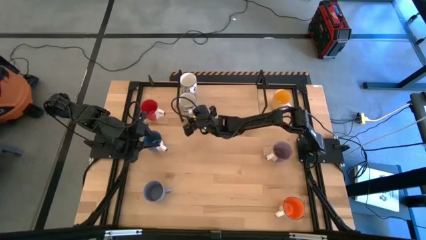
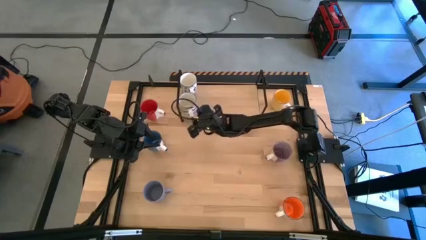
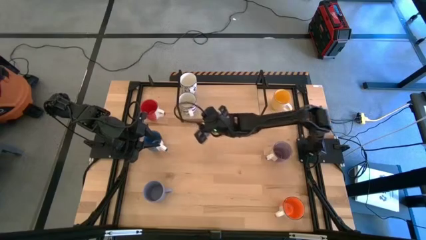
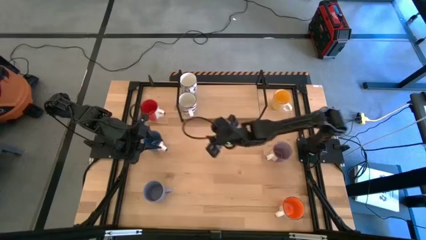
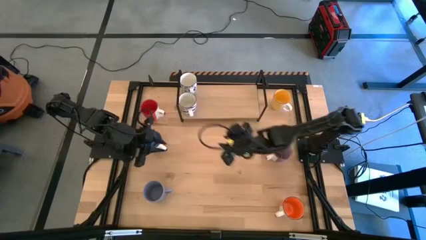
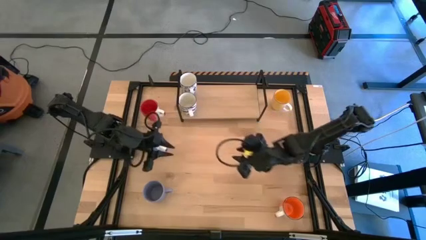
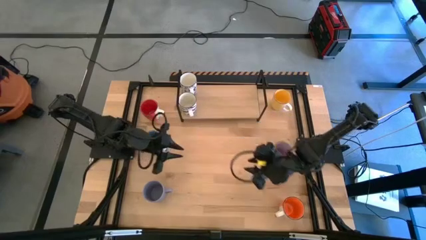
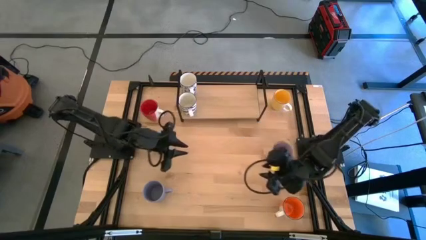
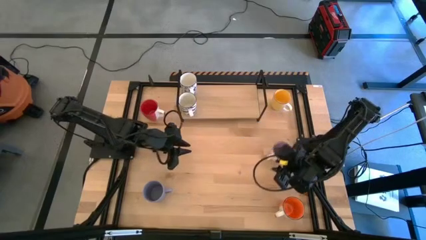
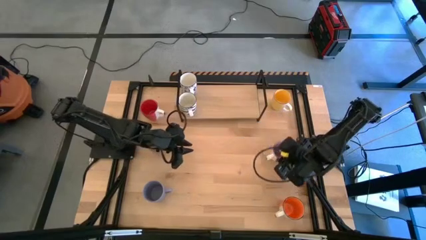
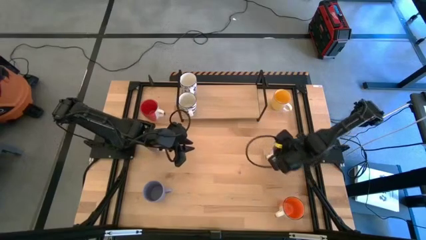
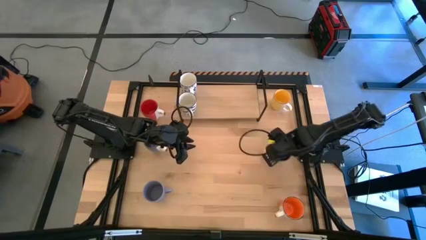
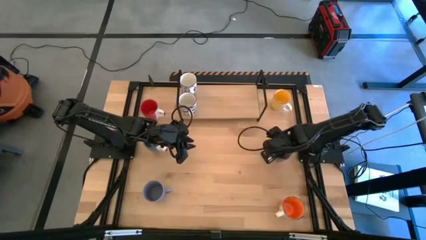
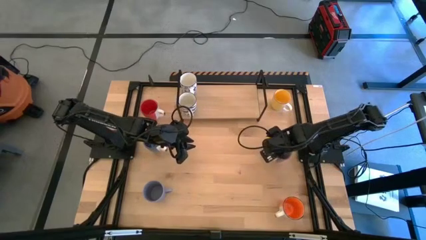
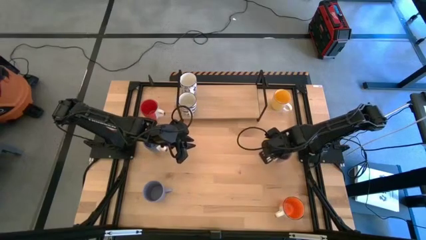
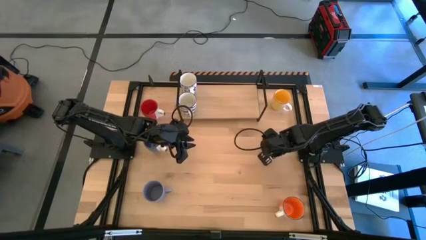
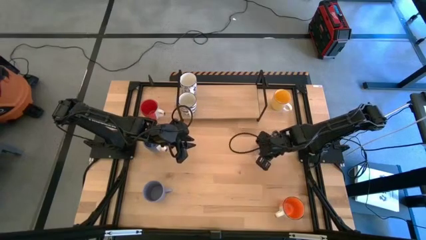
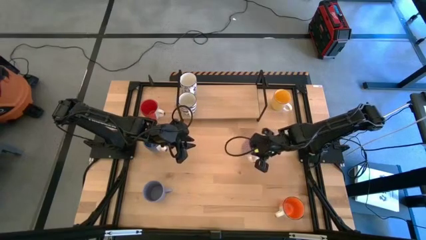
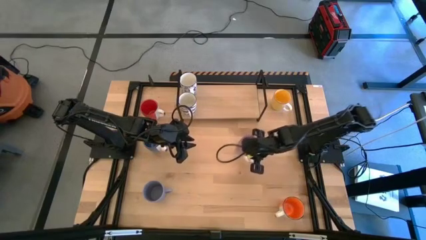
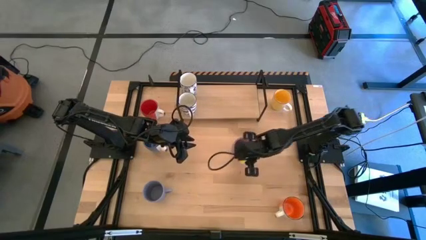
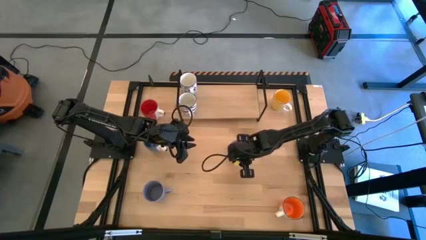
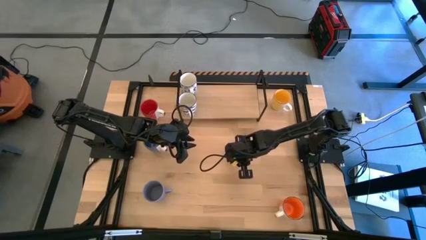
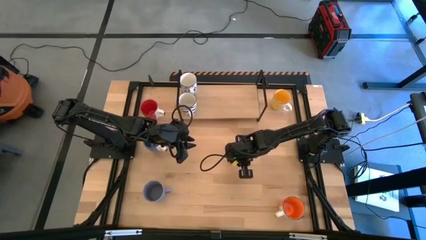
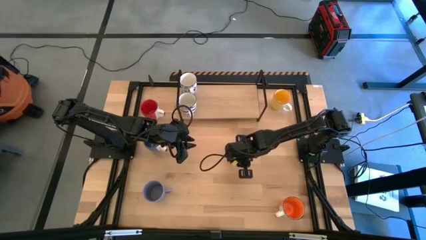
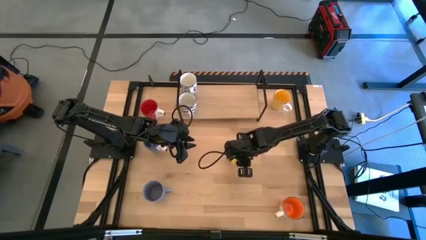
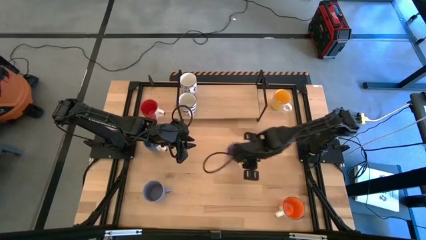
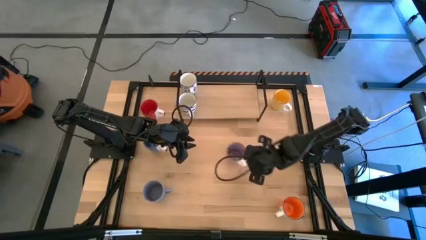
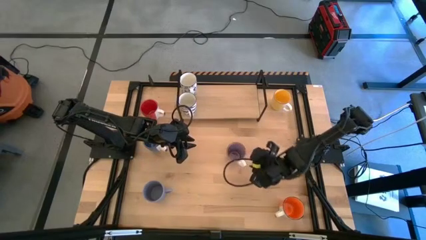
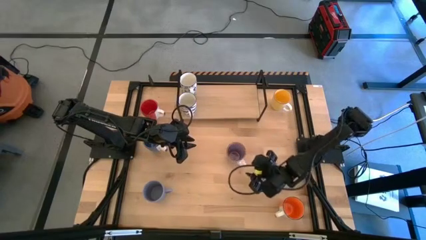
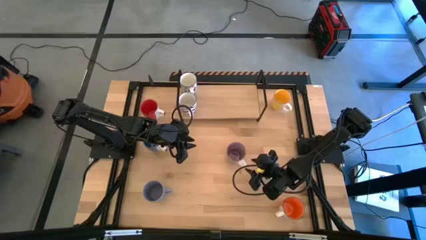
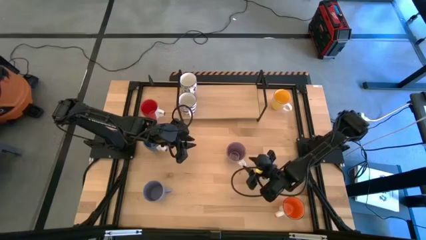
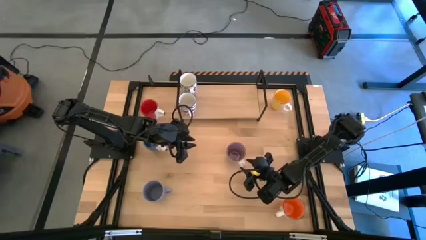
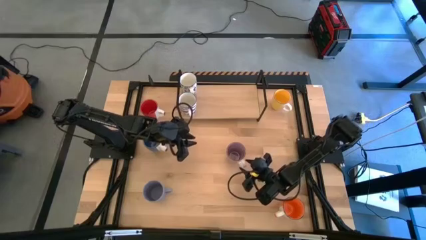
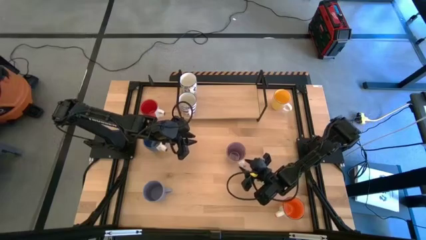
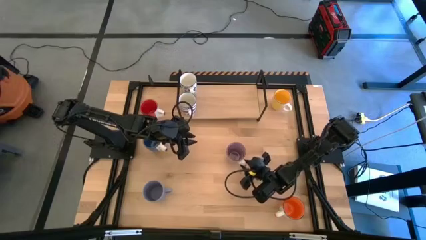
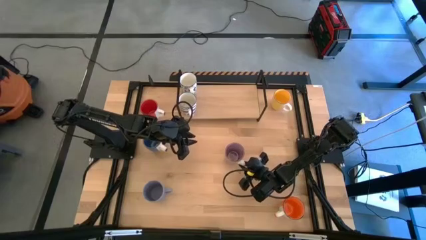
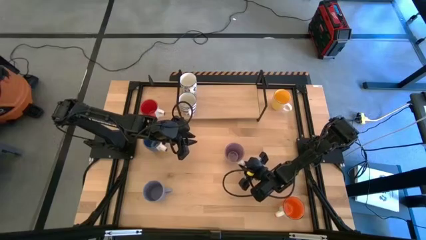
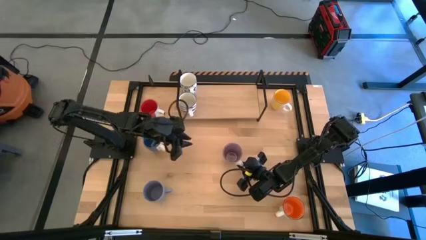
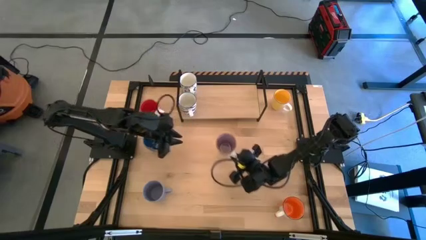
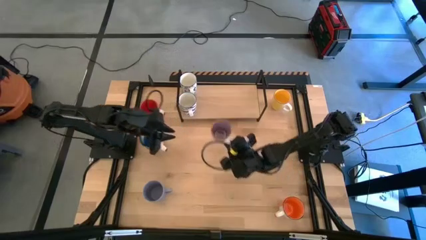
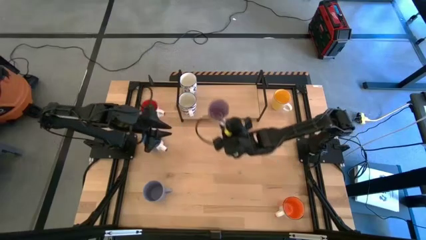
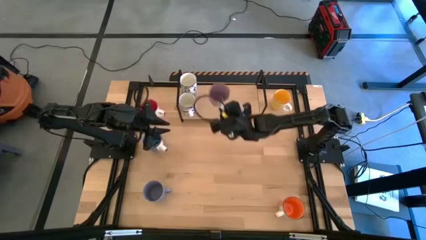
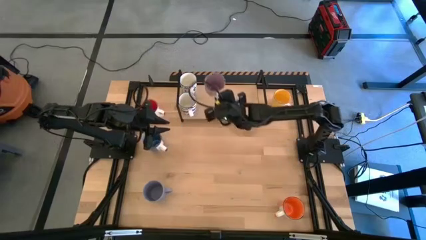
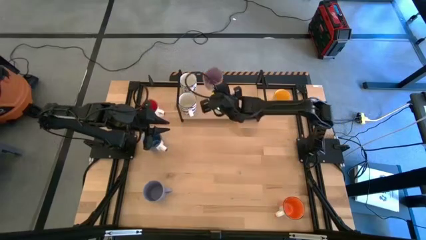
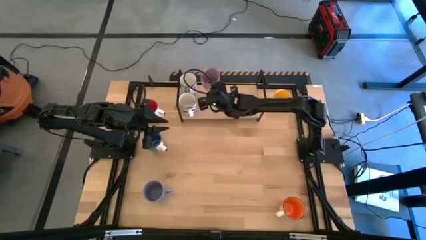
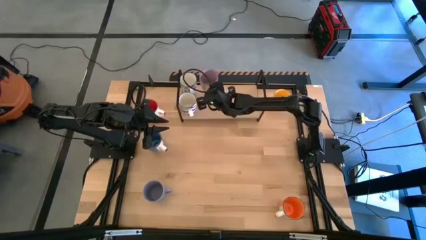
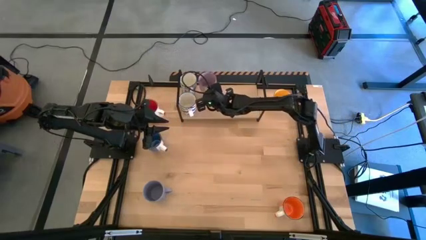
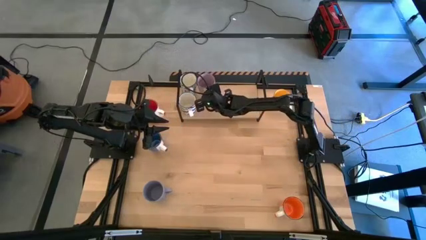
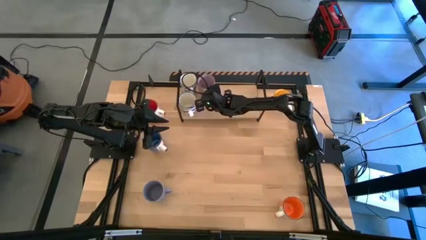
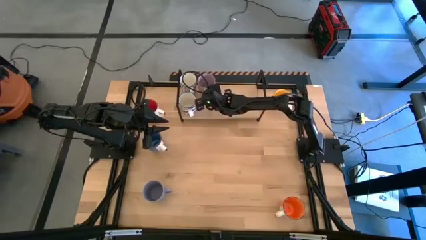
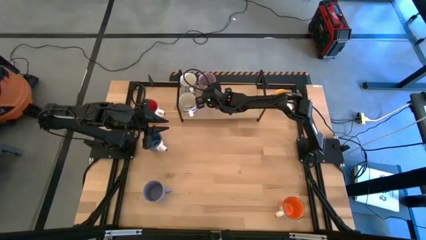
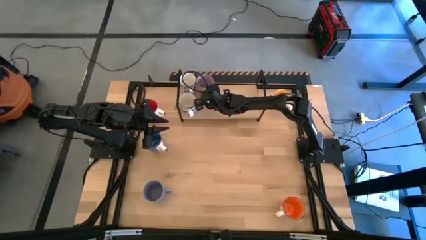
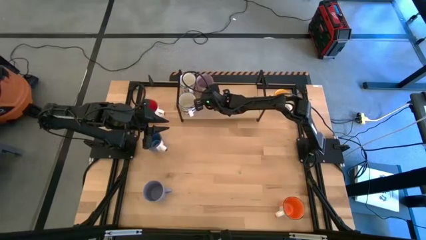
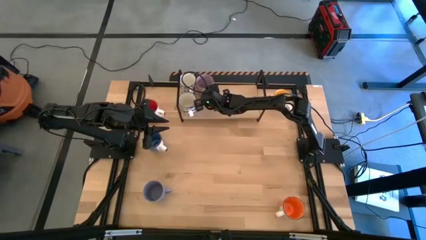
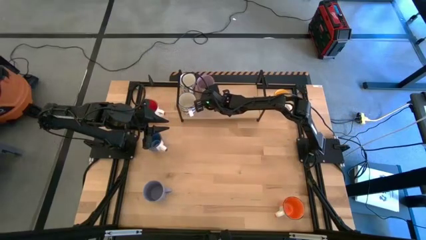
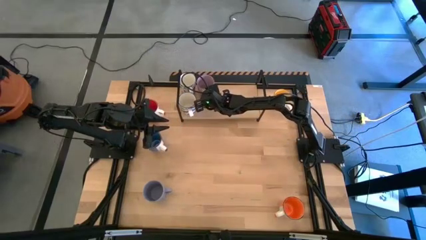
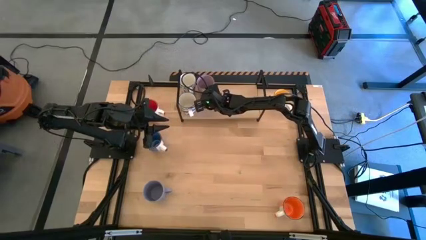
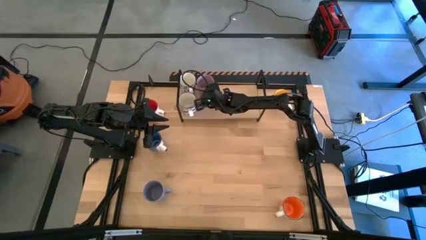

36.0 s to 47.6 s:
Task: Place coffee mugs
Put the right purple mug on the shelf
